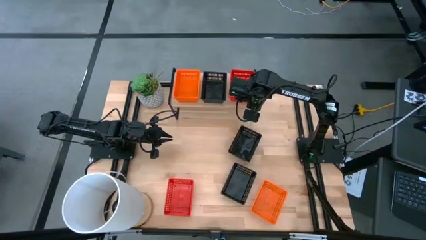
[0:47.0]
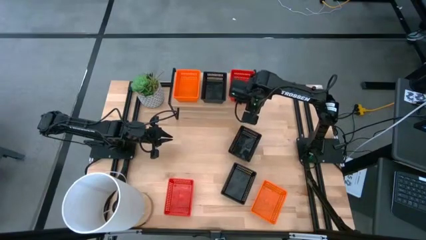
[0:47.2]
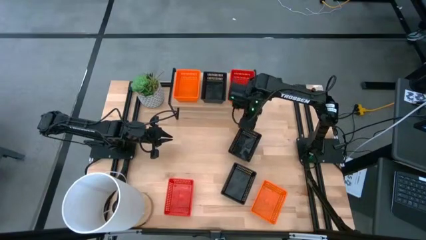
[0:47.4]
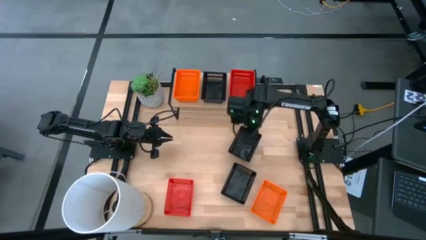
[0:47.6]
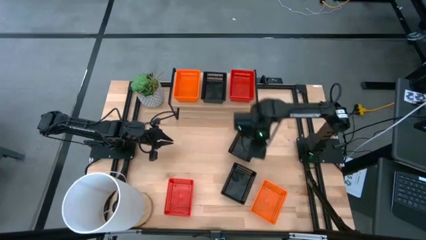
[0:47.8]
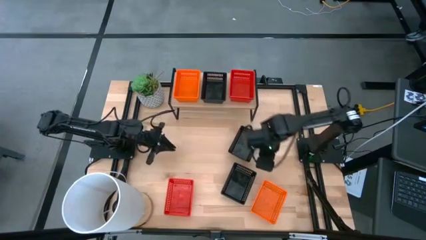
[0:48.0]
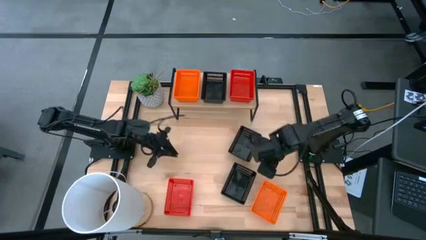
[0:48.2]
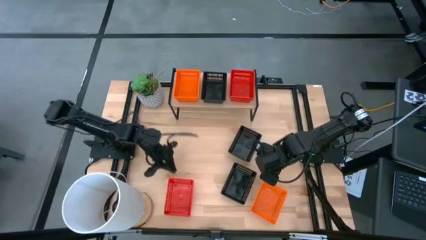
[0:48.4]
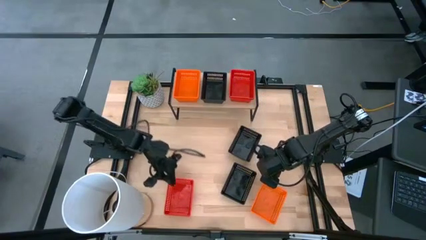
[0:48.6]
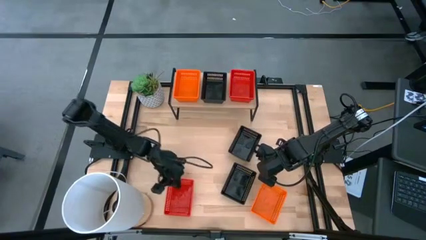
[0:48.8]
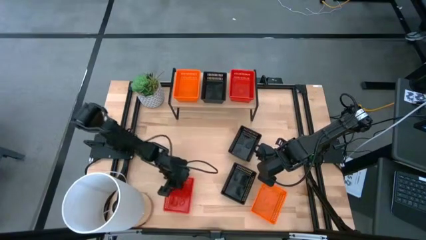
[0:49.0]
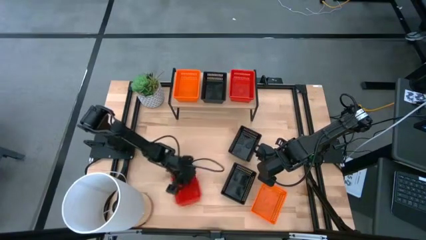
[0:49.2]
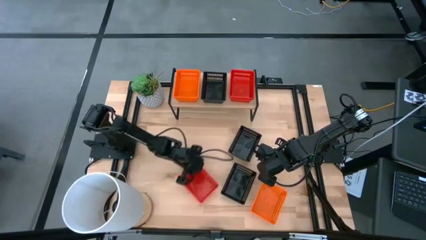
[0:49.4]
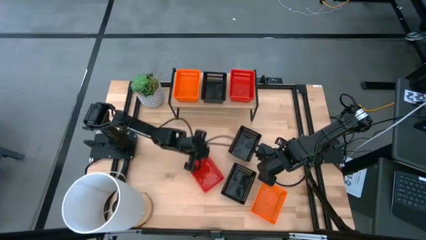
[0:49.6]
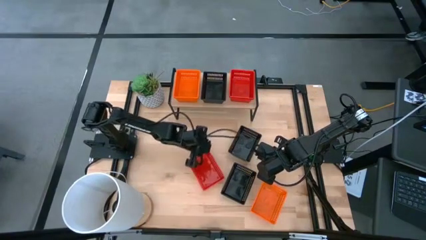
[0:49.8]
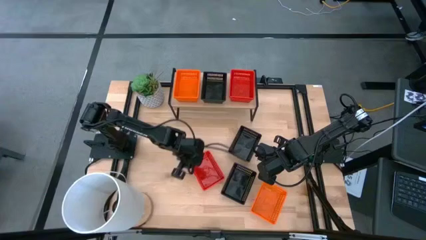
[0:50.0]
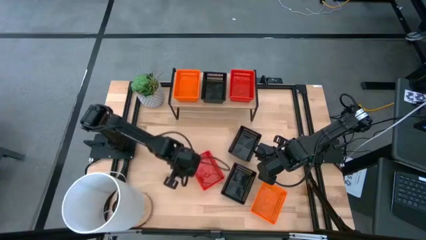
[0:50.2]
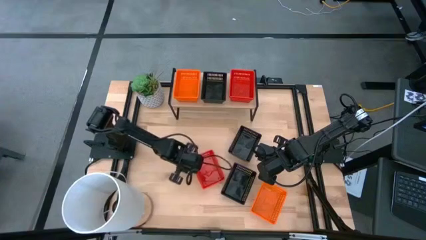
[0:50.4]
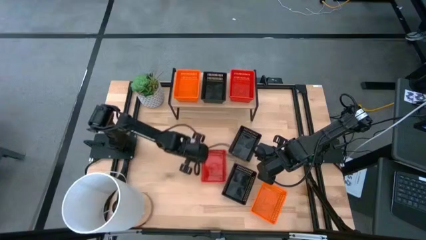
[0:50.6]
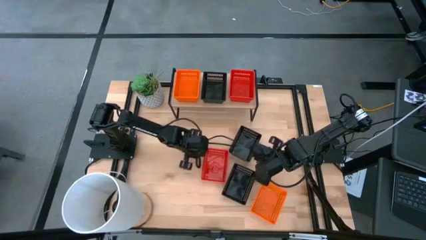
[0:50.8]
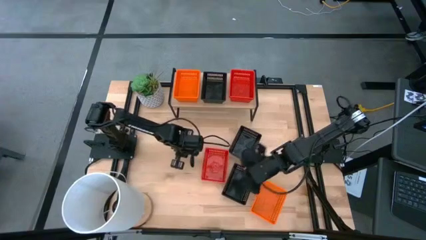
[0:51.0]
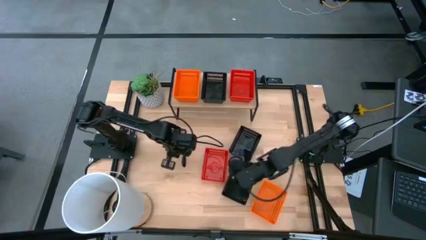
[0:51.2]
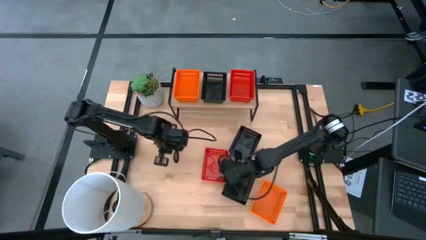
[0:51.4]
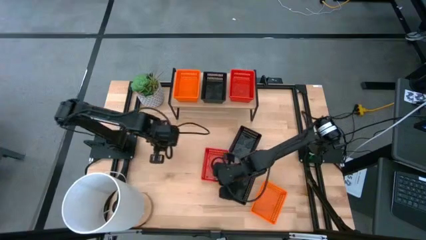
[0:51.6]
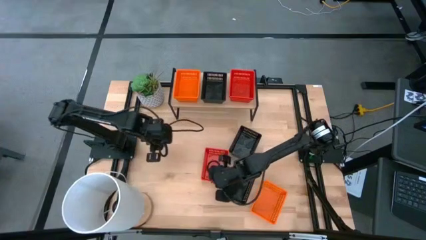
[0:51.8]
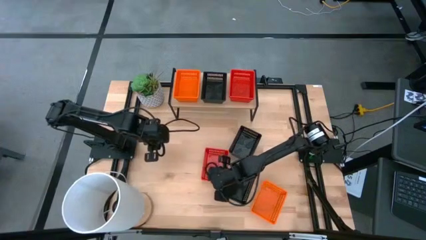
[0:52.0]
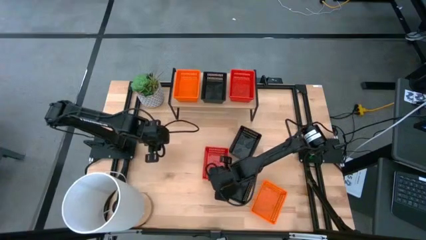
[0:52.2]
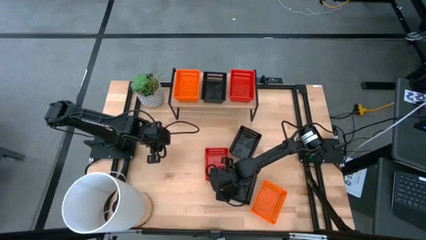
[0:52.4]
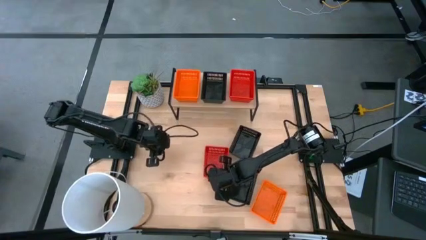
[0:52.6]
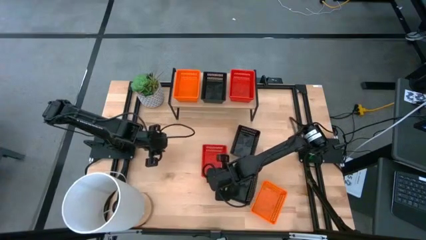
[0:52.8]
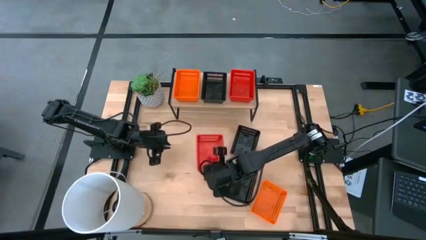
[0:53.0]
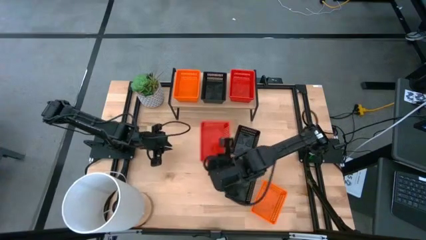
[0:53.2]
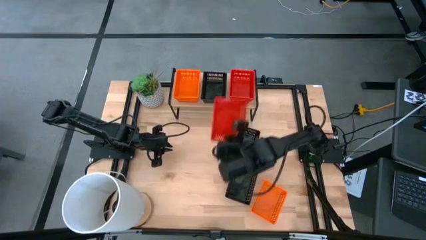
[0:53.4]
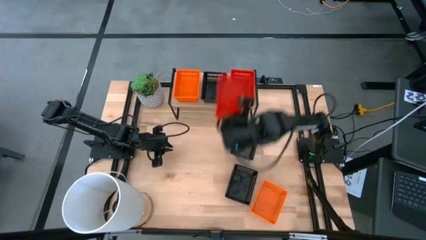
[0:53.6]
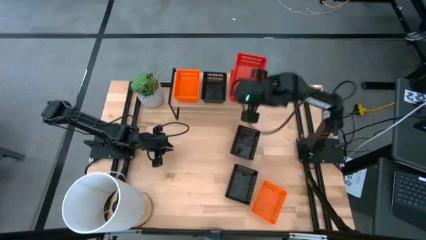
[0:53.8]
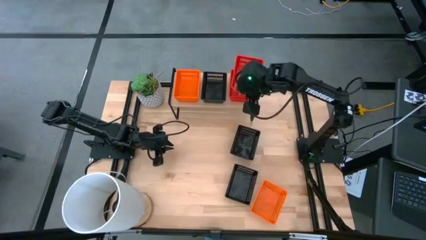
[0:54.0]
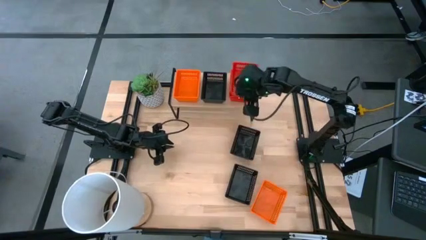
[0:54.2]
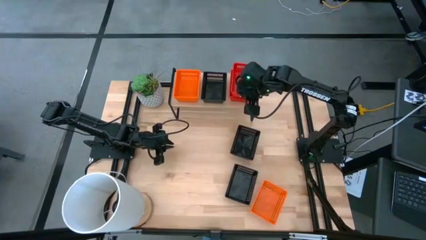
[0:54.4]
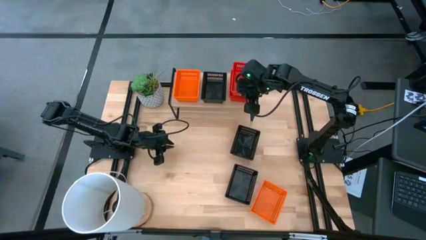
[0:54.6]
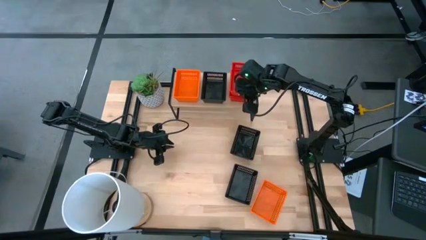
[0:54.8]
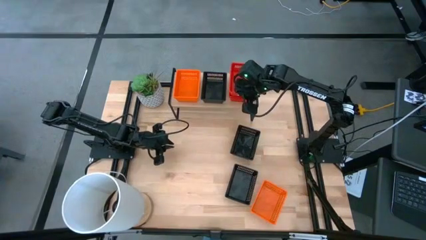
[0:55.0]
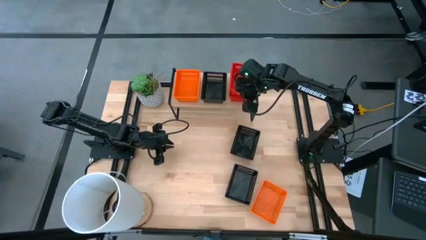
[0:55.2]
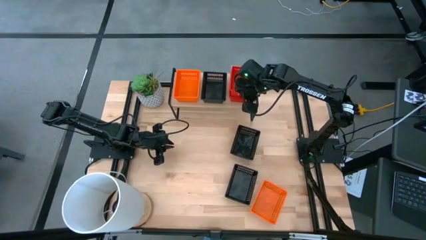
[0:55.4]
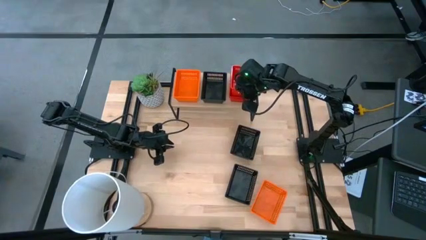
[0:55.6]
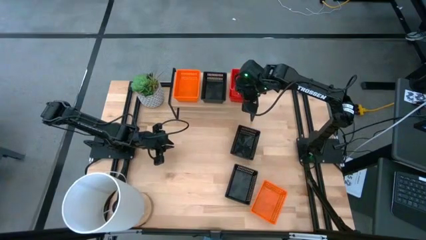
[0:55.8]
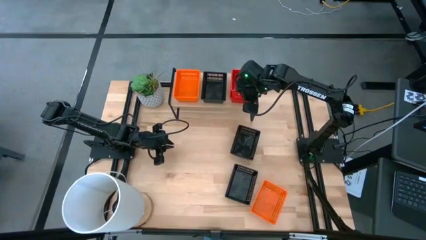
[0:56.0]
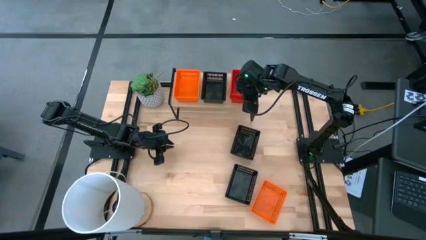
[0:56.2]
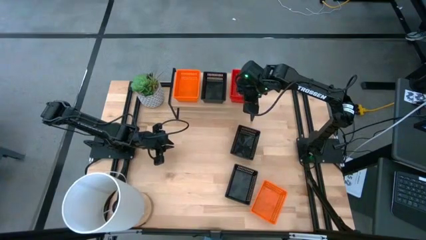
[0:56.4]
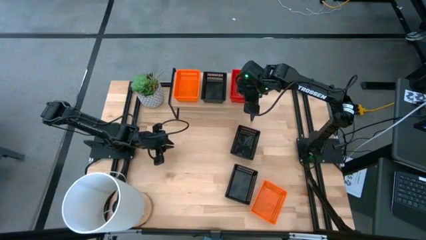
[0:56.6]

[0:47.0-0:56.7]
Task: Stack baskets on shelf by color
Stack the red bin on top of the red bin on the shelf

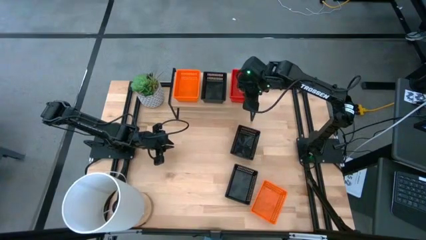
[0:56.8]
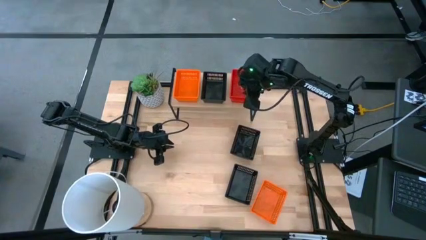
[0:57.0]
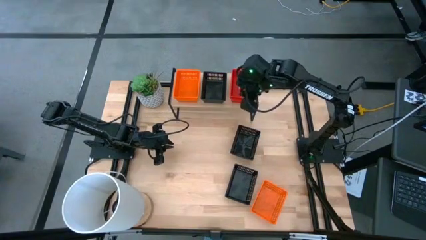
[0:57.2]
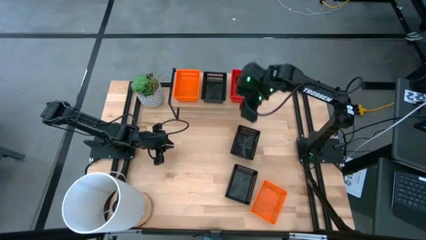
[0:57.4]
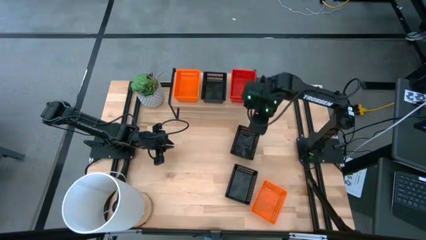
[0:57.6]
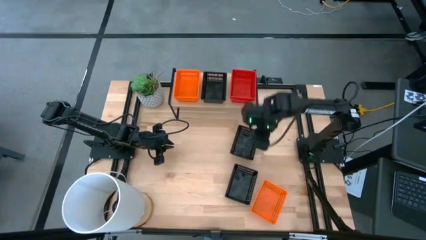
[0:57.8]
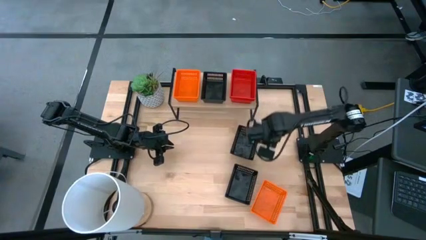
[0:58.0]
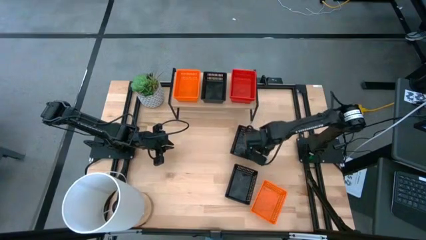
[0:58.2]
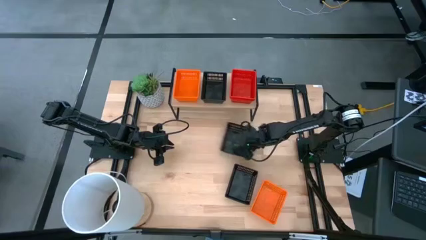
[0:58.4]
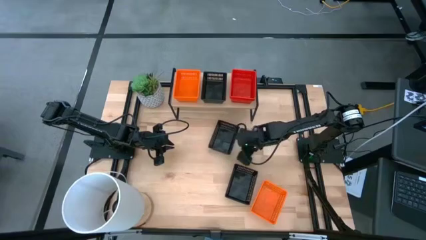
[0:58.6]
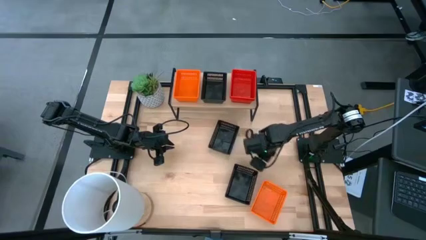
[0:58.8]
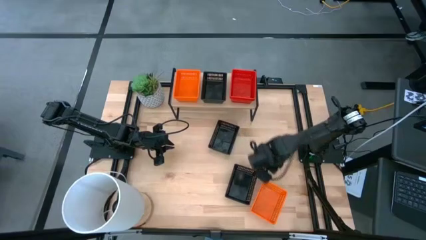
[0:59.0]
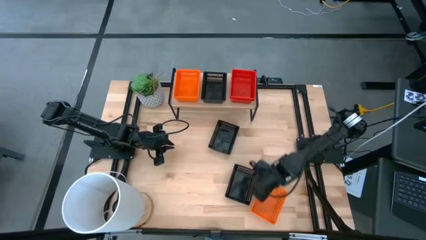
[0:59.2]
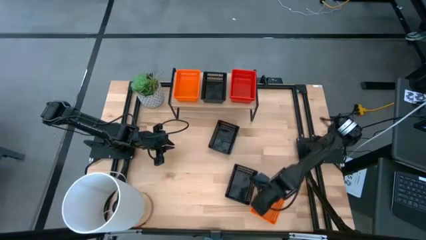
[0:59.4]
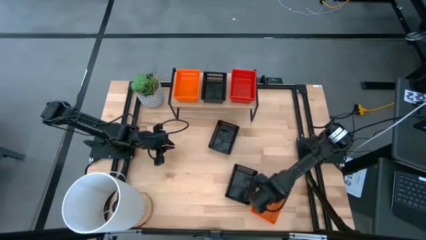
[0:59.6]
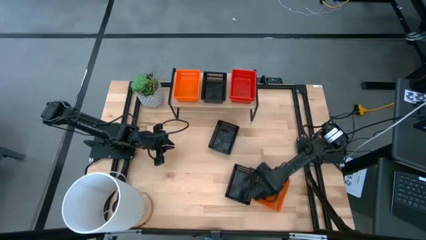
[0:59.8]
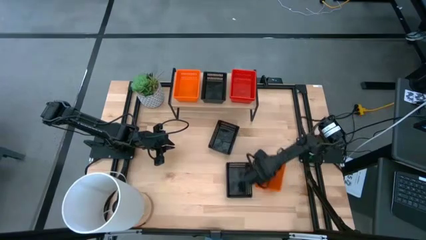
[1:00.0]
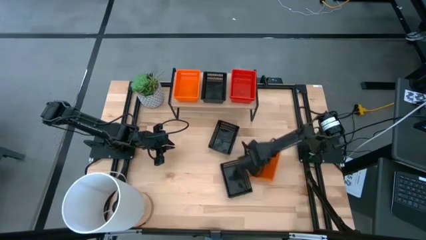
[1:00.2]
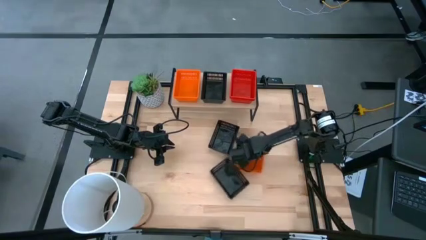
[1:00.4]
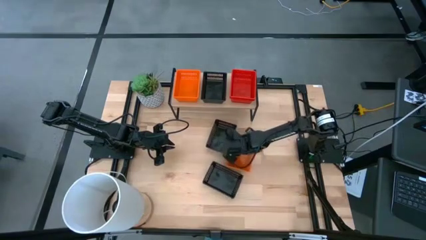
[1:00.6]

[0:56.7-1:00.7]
Adjust the bins to the center of the table

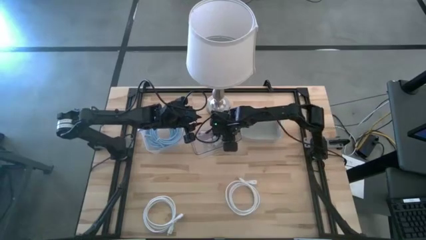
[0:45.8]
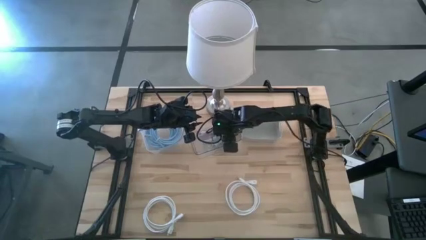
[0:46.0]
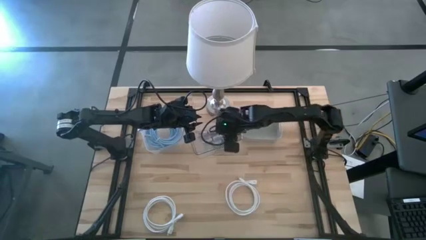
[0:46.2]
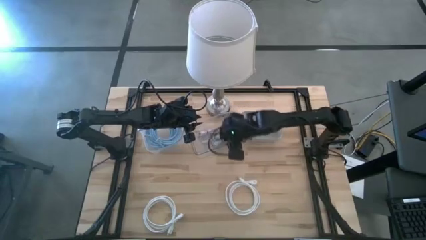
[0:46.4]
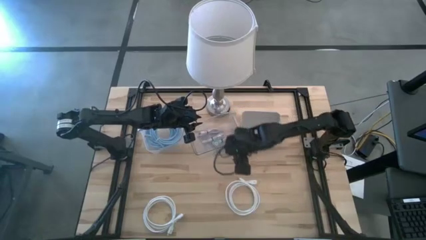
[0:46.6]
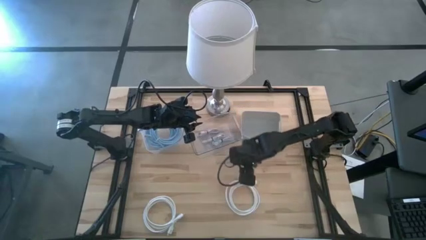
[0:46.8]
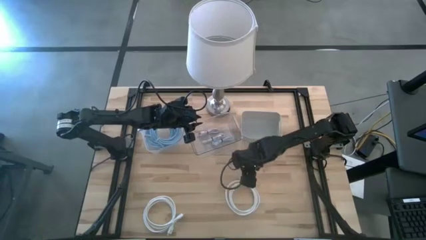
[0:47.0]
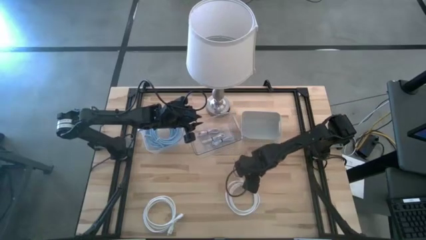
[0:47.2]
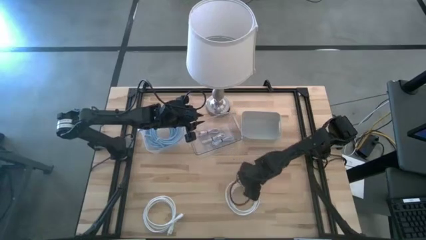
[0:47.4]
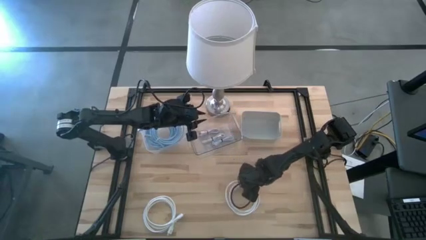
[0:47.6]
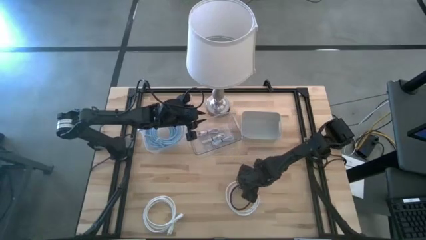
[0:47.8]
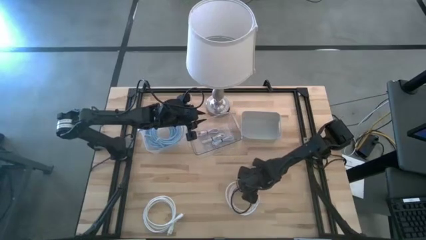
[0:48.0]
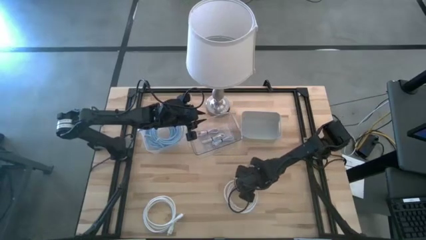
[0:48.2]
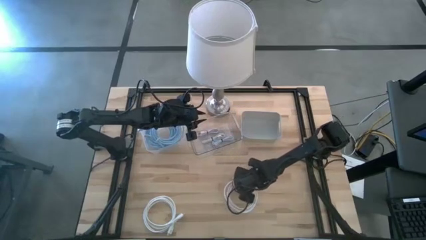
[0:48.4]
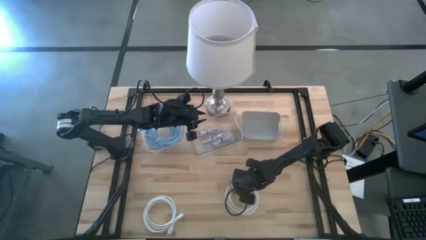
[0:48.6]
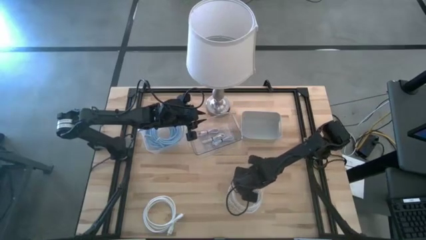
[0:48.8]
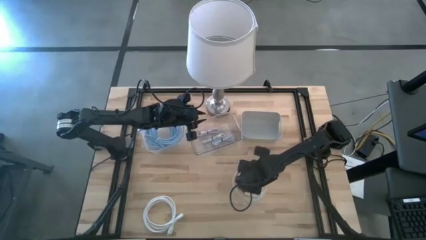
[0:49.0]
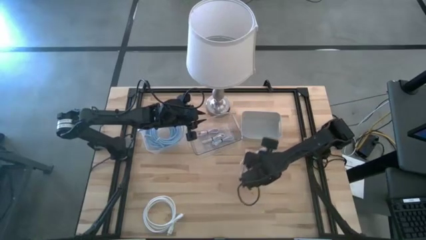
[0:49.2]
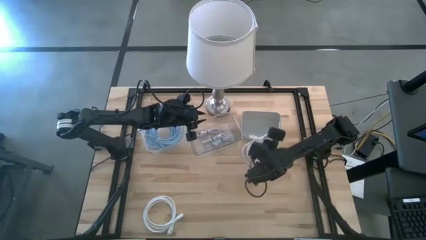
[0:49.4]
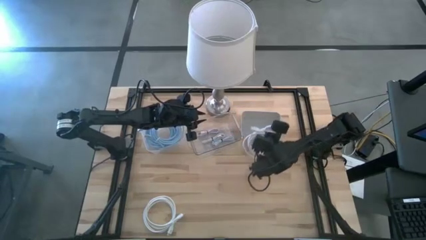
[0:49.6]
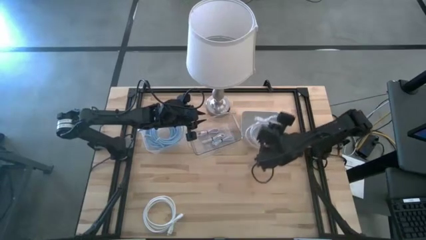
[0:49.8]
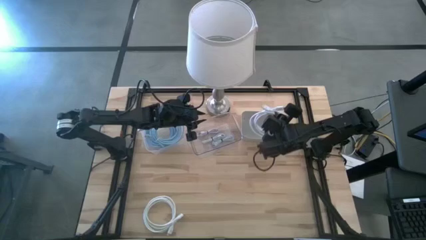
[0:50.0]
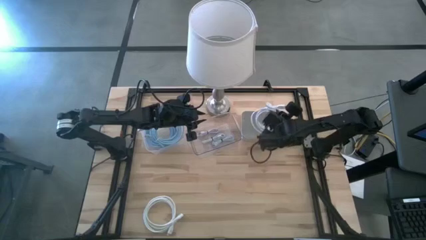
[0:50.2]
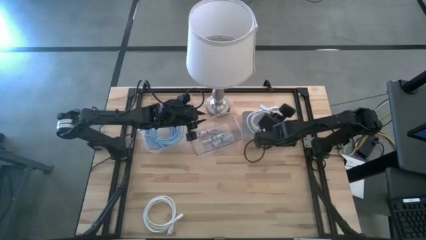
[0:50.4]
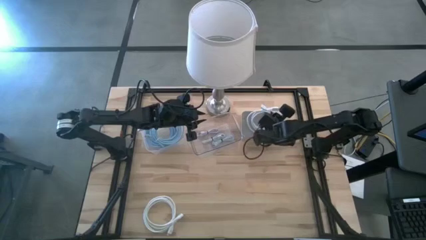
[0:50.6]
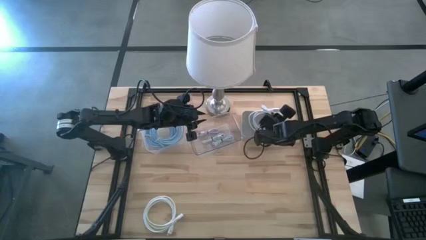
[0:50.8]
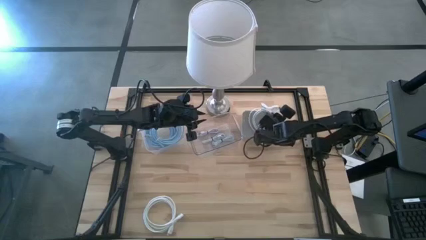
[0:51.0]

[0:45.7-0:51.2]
Task: Pick & Place USB Port
Put the right white hdmi cable into the gray bin
